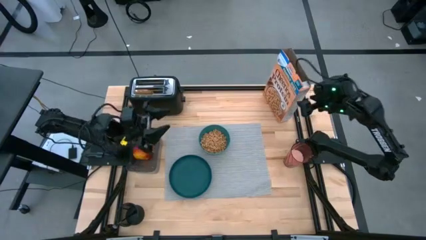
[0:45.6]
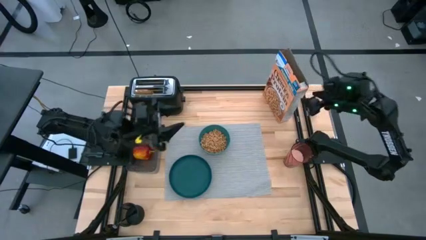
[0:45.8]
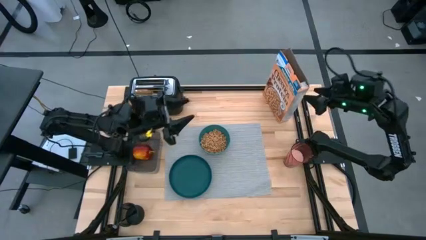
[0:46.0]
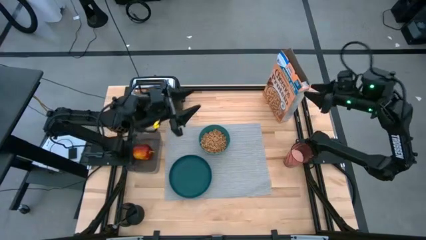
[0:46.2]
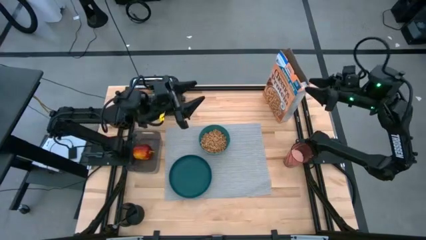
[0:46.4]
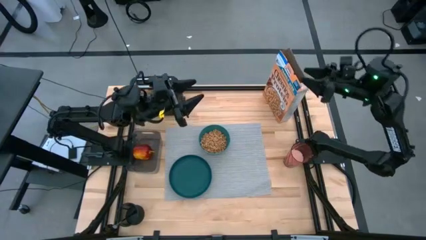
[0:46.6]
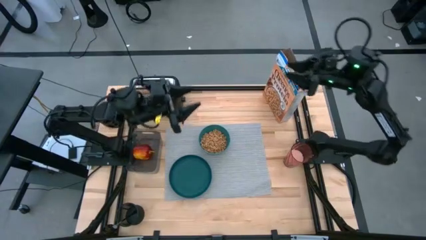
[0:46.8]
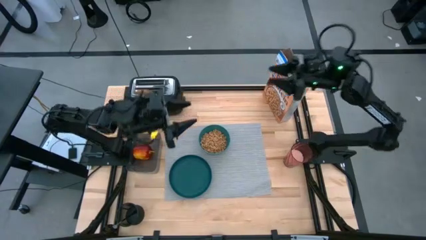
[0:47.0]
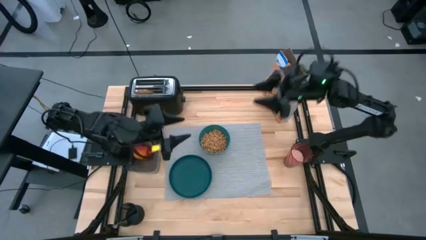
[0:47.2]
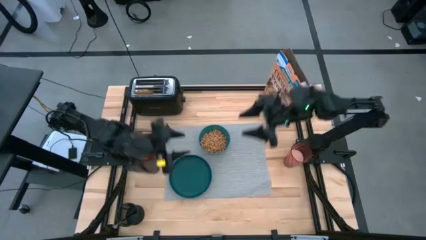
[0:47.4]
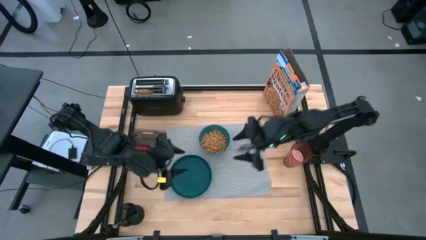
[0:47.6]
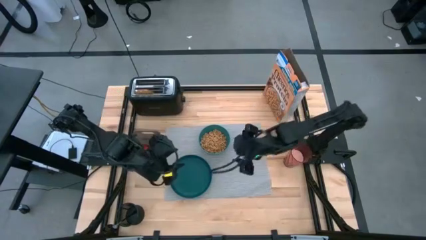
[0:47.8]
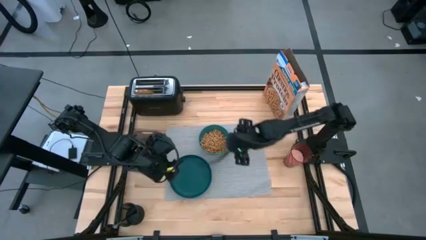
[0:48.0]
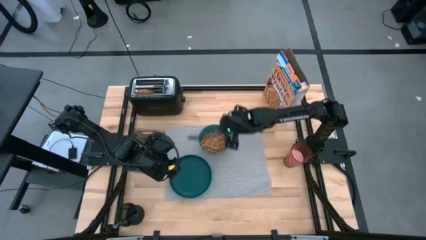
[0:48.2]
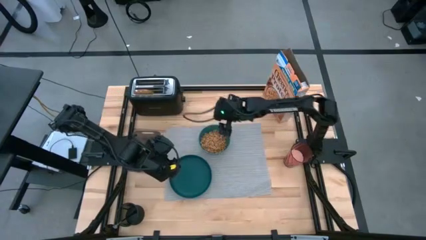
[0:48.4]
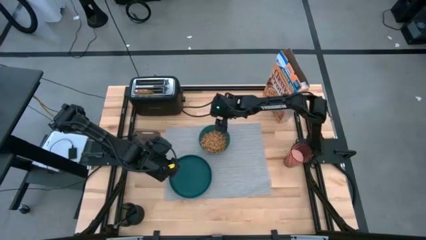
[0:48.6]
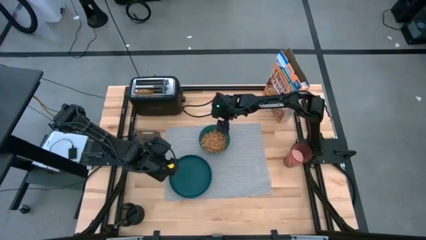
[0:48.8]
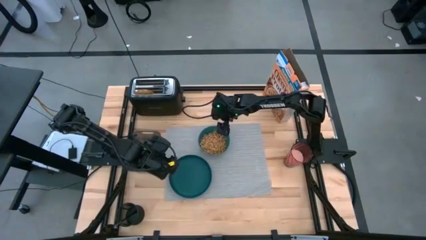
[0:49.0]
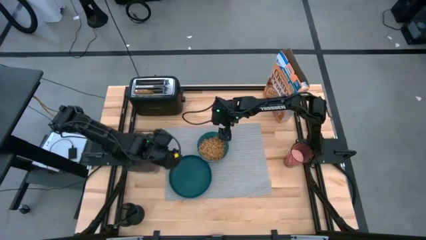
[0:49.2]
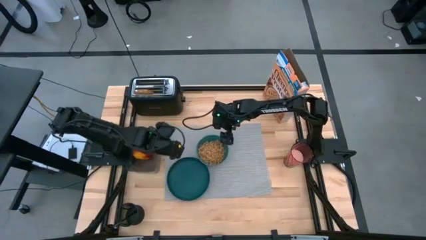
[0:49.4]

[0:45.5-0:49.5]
Task: Arrange a breakfast setting
Move the green bowl to the center of the mat

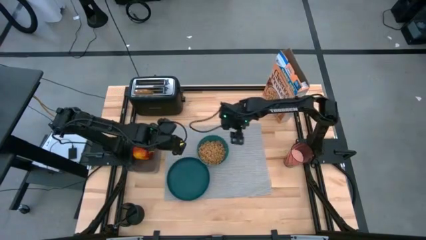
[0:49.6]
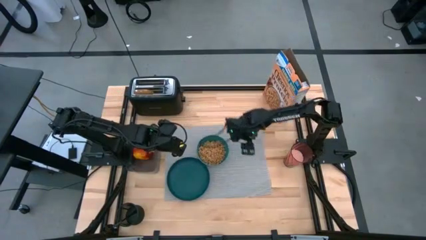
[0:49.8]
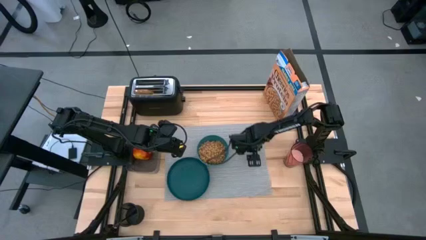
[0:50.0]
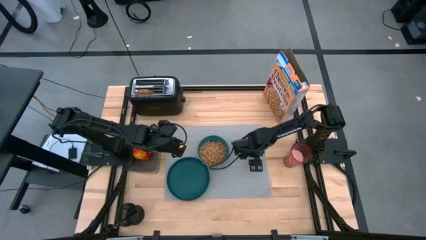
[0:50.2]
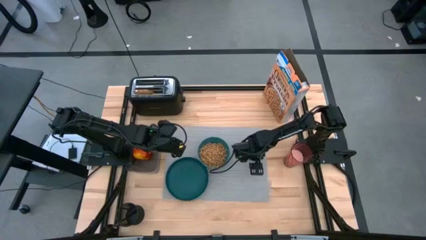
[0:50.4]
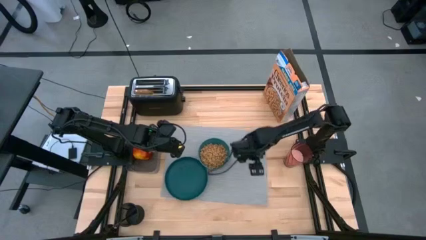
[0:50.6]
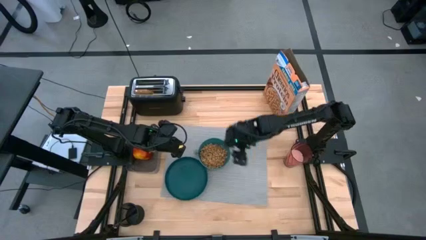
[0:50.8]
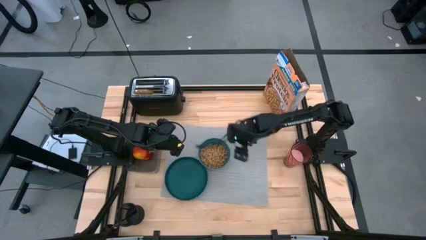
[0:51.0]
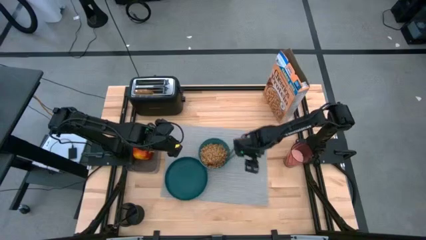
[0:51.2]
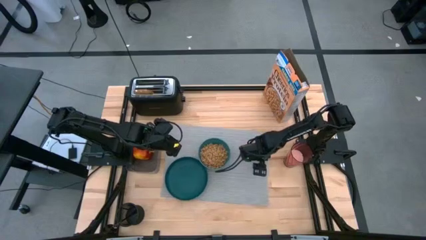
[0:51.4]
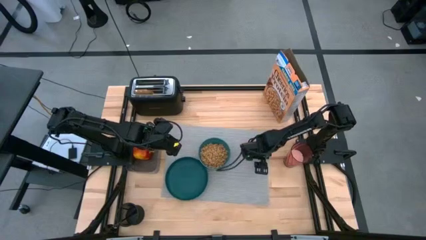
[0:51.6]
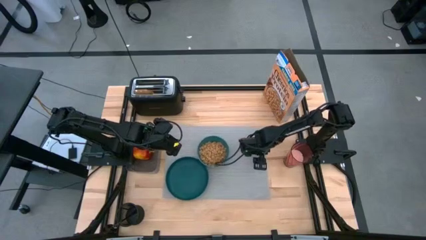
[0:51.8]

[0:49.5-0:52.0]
Move the mat to the center of the table

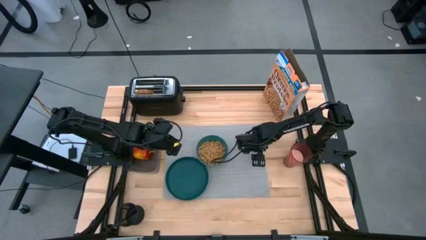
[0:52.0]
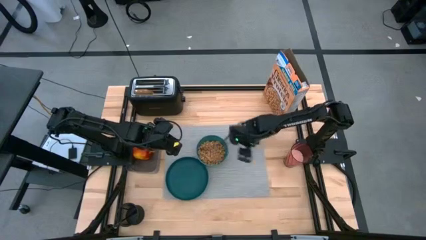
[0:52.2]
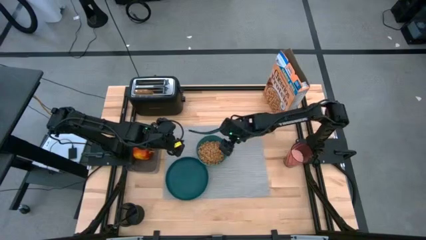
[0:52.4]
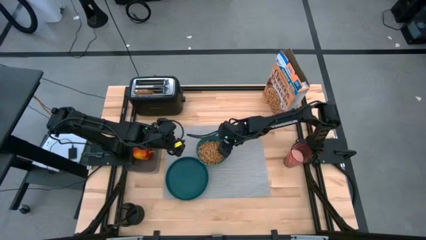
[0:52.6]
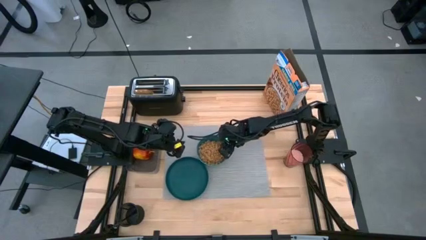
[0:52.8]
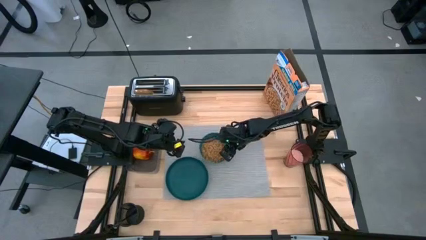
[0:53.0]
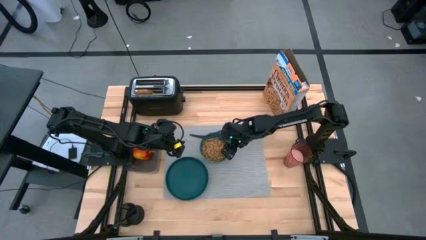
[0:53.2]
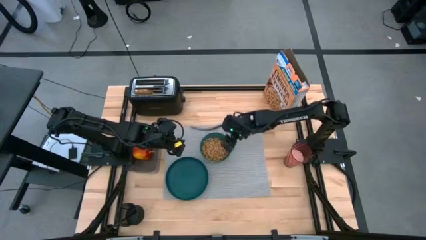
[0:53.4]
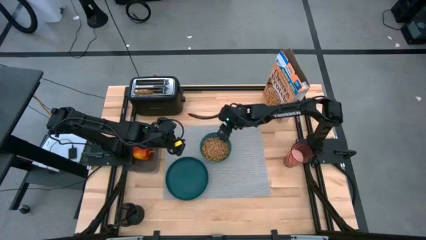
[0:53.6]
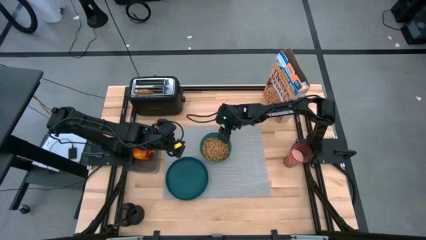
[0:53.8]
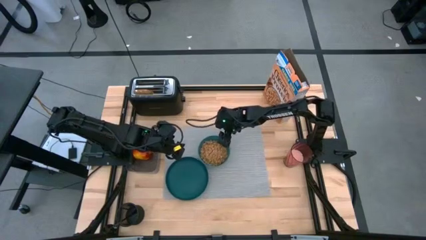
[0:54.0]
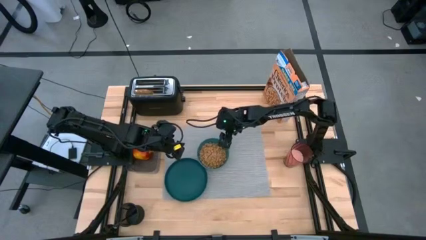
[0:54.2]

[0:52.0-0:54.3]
Move the green bowl to the center of the mat

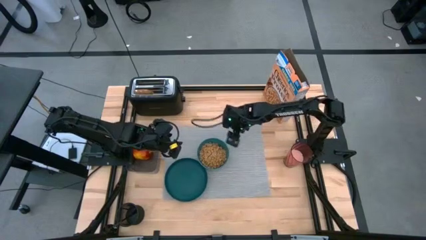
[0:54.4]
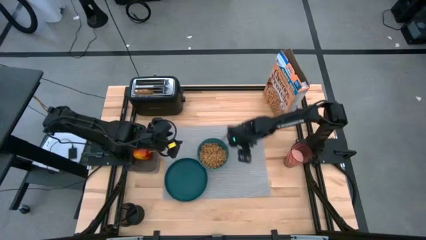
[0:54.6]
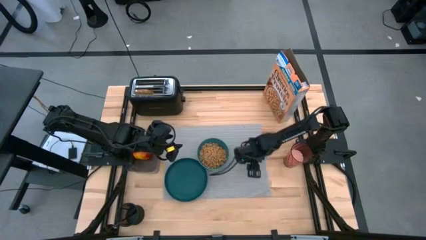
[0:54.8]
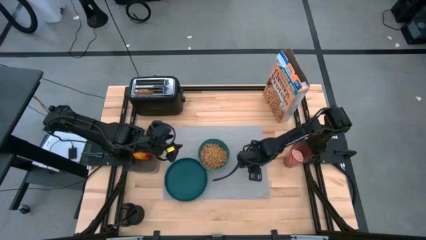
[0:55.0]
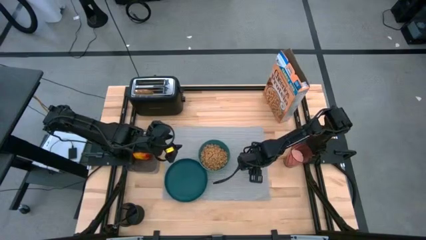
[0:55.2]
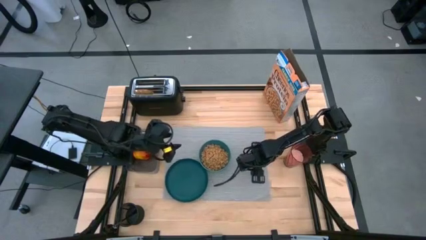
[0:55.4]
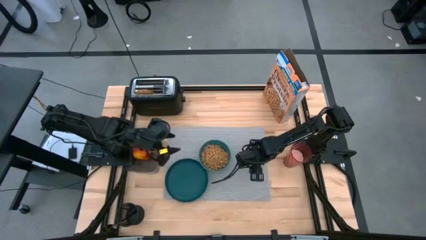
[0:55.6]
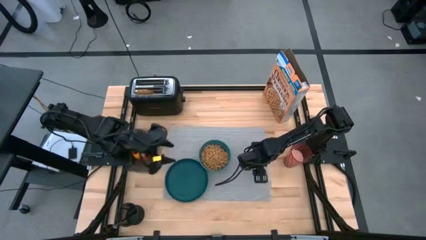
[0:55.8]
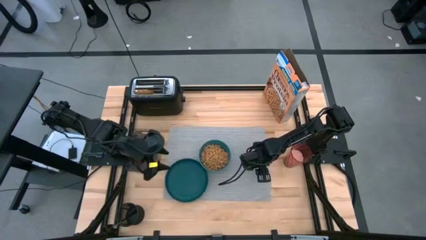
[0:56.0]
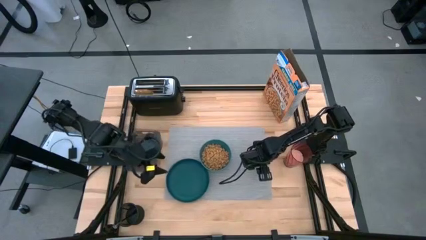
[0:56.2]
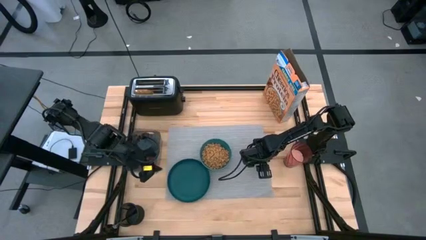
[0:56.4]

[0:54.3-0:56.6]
Move the mat to the center of the table

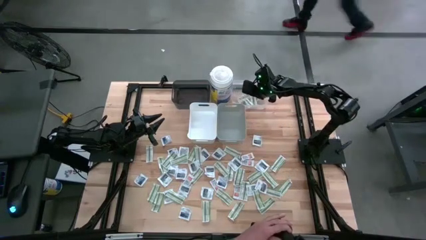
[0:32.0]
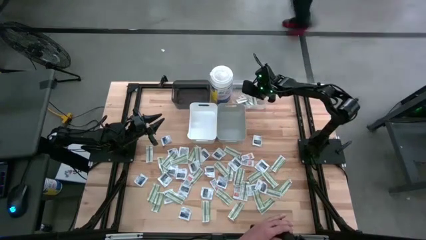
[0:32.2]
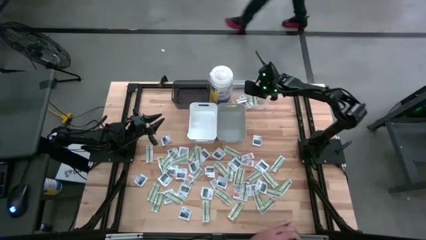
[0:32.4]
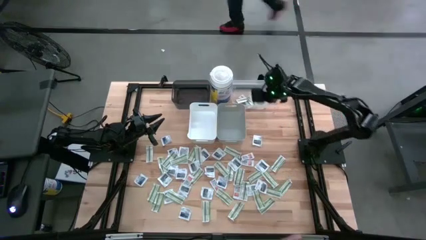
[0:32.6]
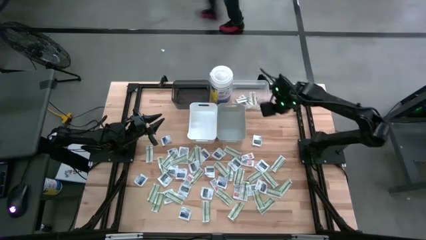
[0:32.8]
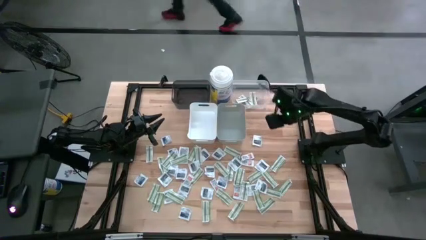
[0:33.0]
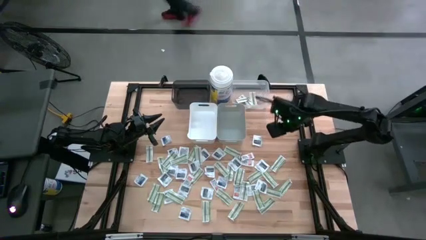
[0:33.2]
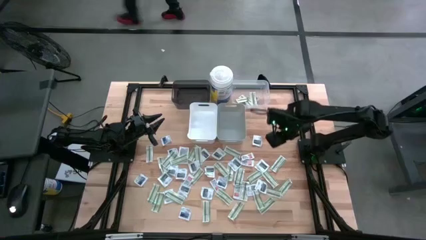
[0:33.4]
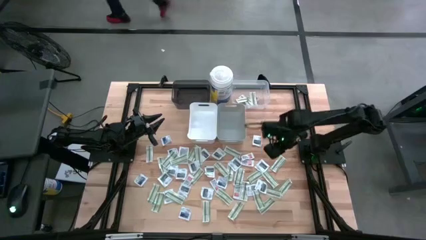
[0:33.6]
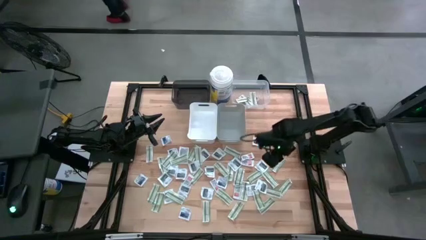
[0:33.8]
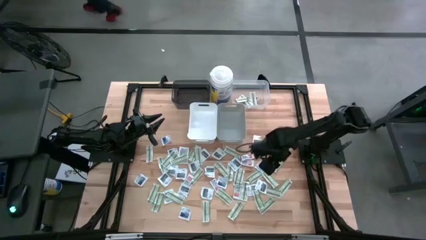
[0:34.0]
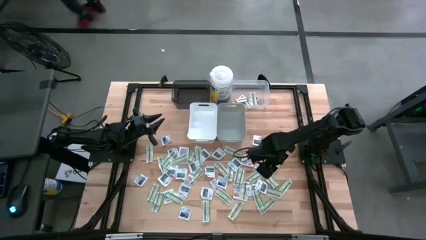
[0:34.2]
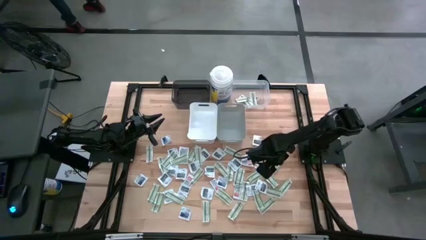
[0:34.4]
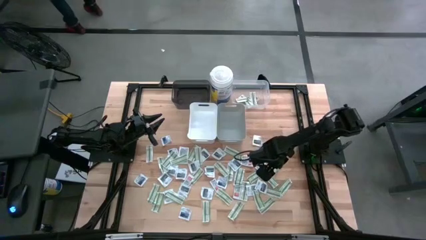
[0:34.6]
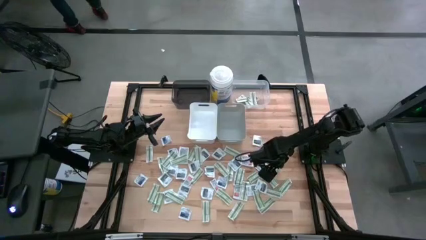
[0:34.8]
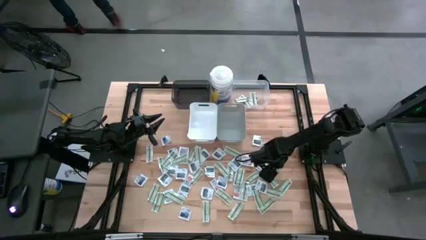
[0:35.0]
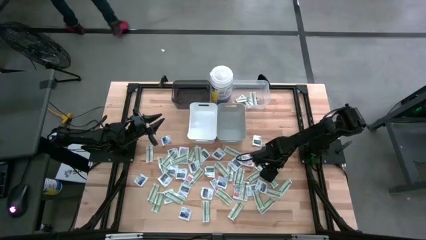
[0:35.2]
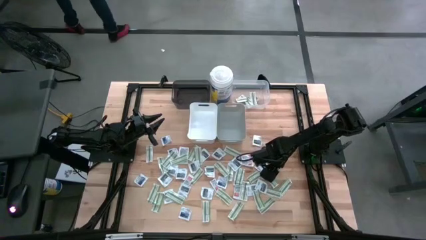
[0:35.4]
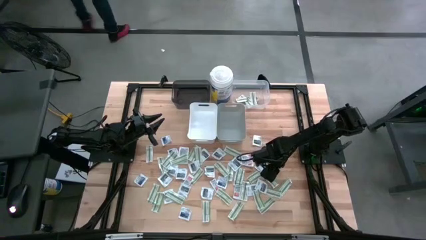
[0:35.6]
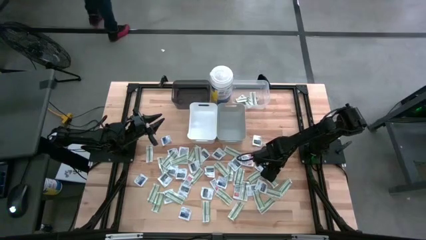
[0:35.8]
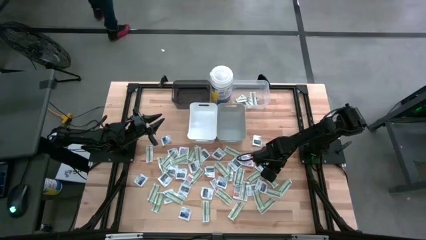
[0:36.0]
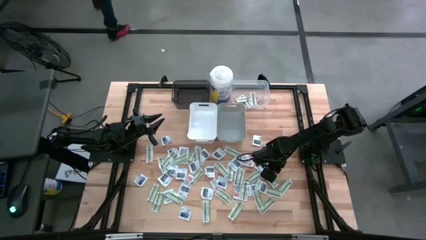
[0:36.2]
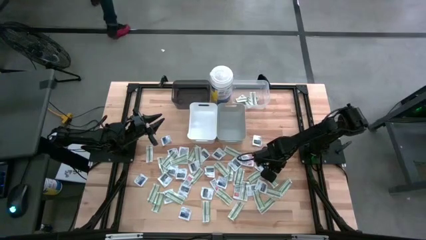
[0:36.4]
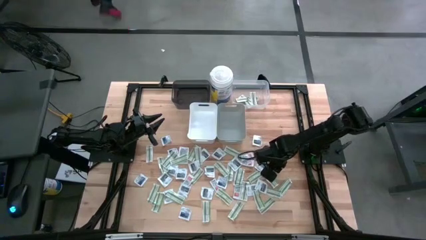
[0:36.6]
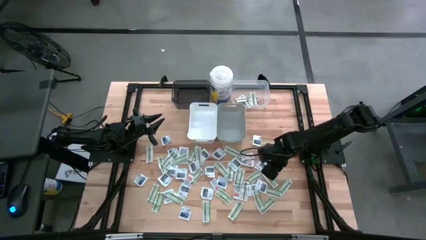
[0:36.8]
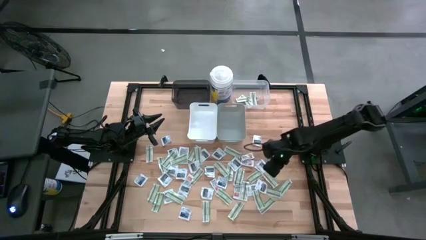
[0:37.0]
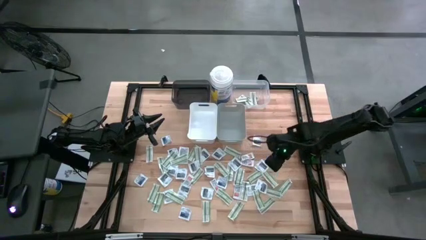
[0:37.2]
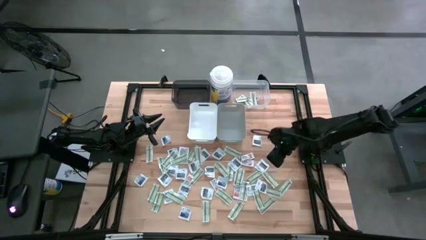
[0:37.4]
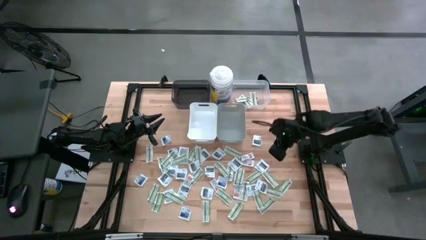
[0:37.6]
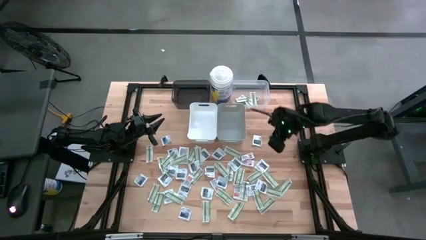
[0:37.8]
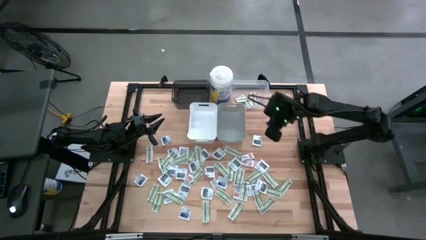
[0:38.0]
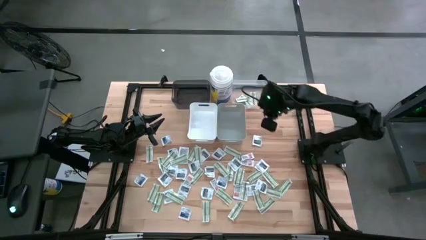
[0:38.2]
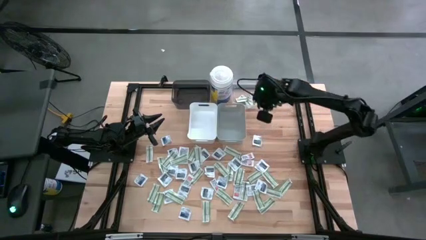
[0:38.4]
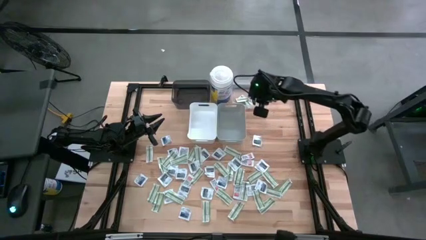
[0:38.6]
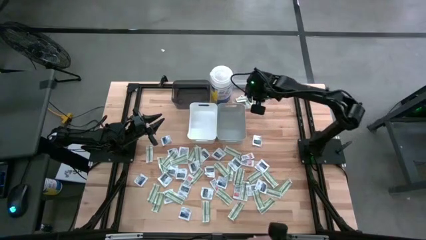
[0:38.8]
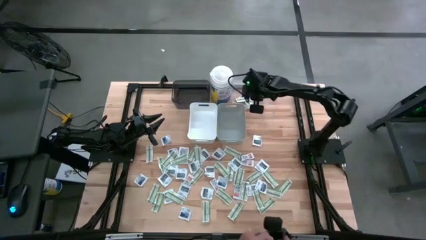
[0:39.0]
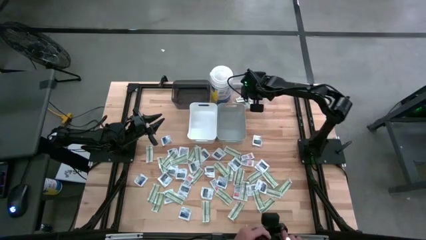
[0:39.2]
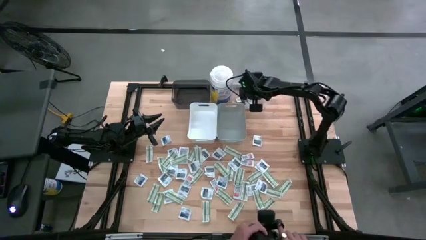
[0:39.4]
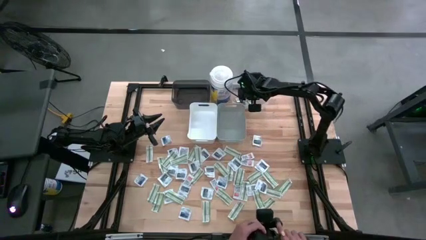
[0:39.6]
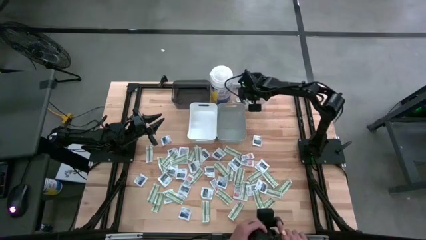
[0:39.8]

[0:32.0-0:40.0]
Task: Pick & Place First Aid Supplies
Put the band aid into the transparent bin
